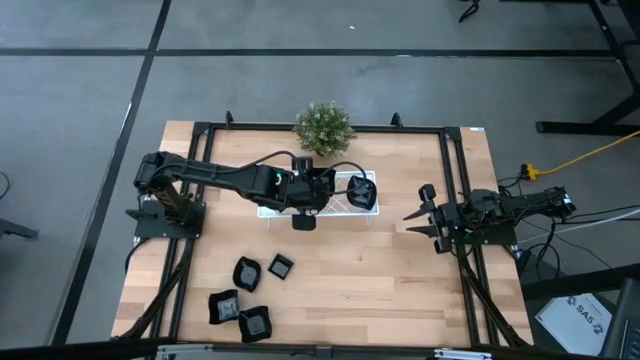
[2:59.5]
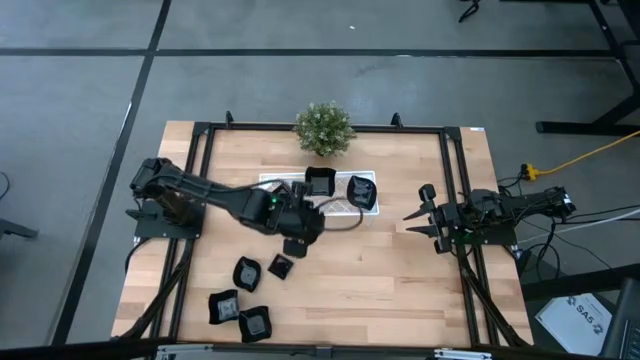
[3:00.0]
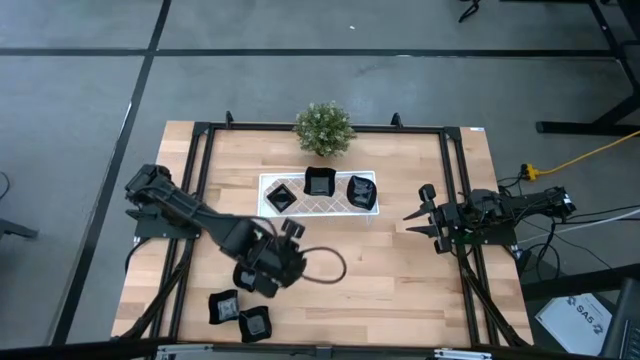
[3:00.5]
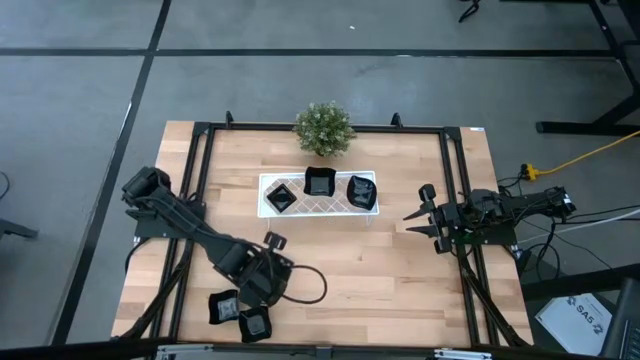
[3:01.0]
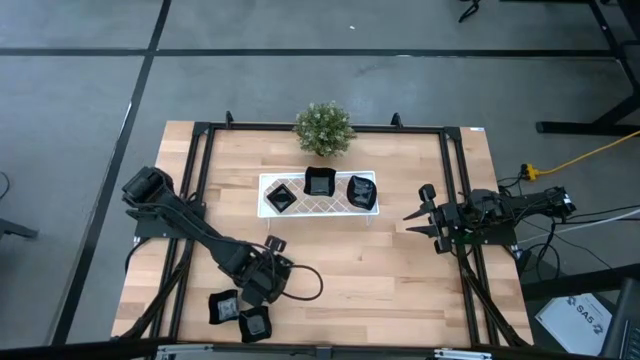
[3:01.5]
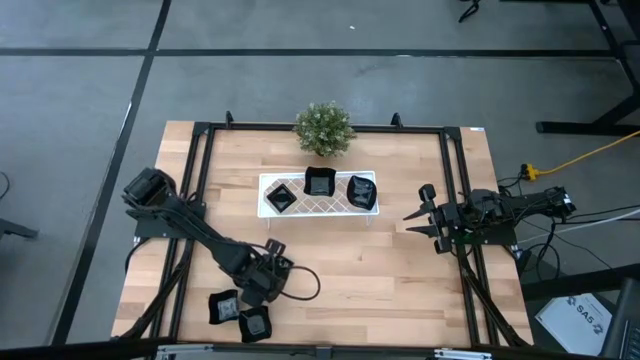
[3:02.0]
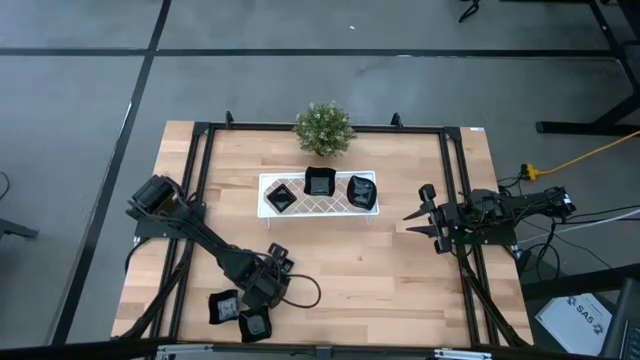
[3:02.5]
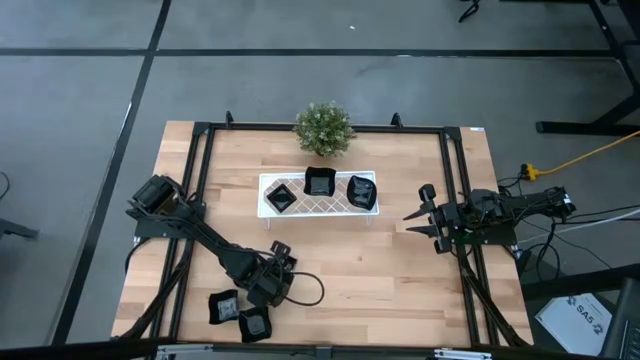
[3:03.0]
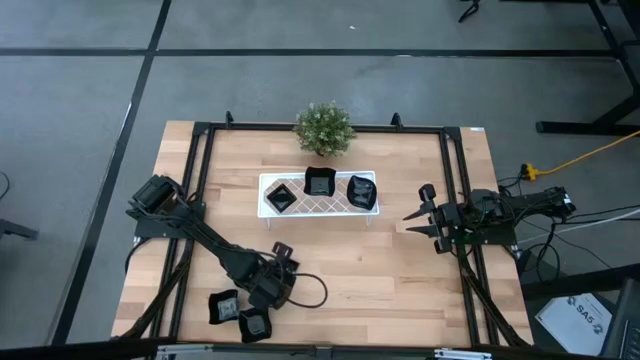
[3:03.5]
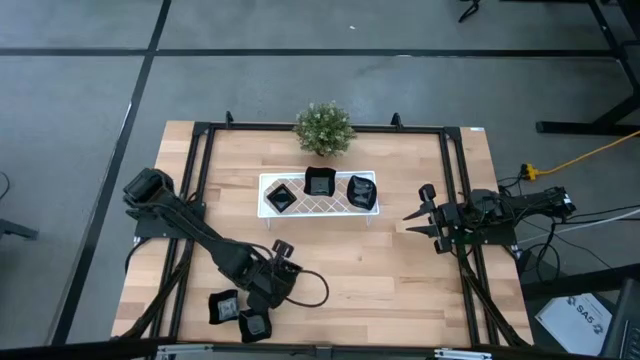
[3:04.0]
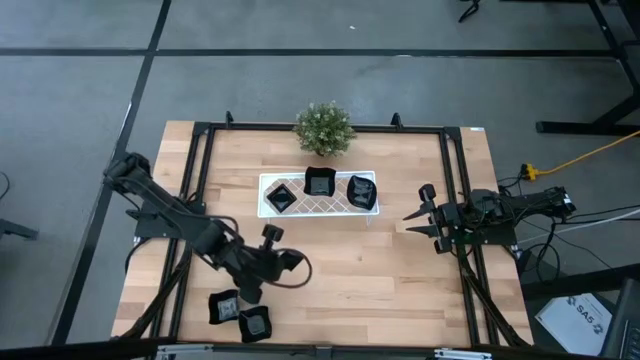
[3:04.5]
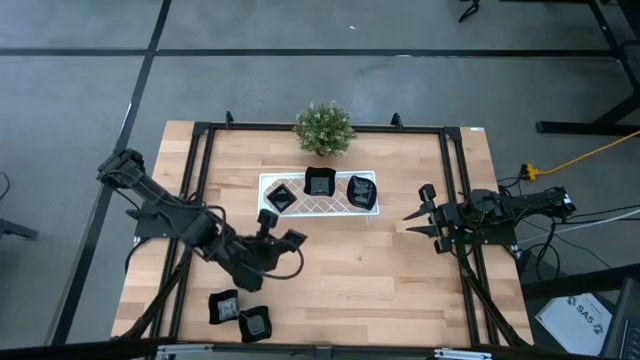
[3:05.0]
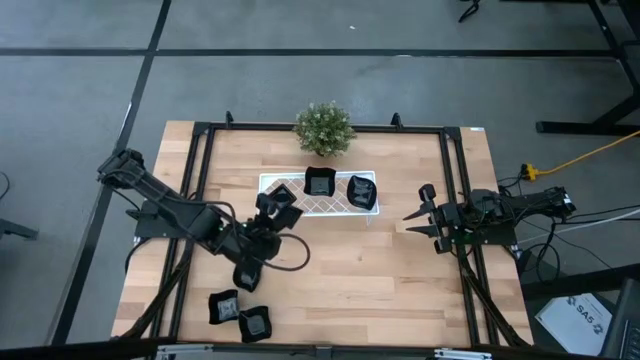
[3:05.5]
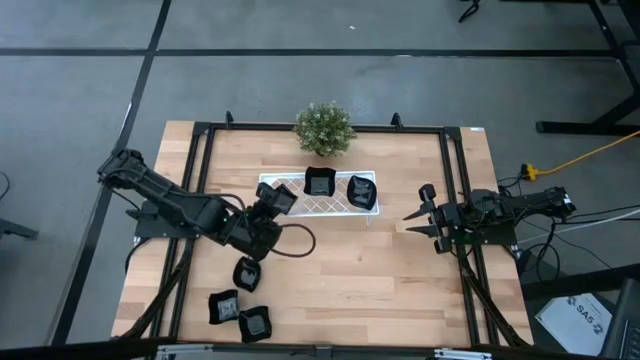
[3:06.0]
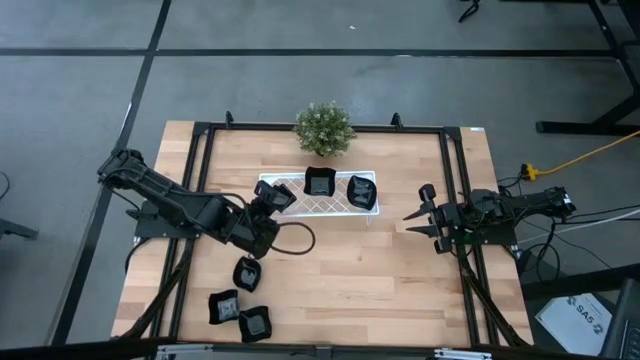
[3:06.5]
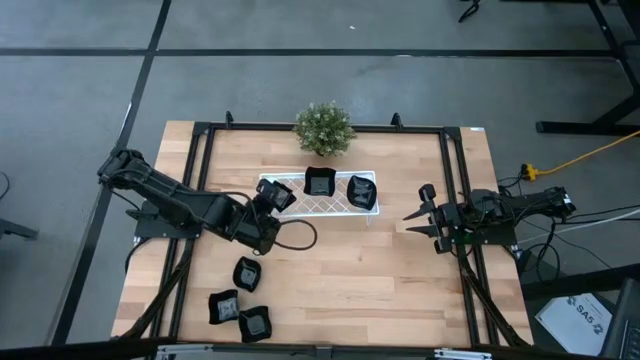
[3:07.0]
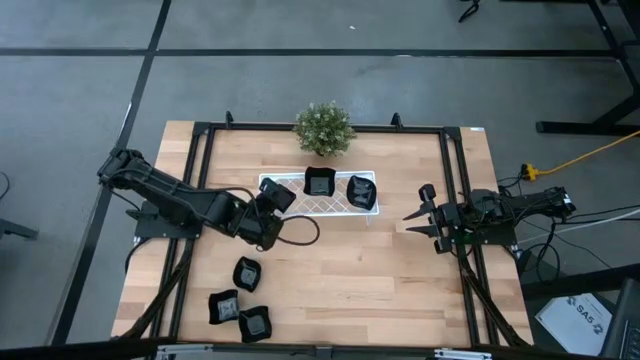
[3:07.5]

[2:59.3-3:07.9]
Task: Pick & Place Mini shaped plates
Stack the black square plate on top of the black square plate on the shelf

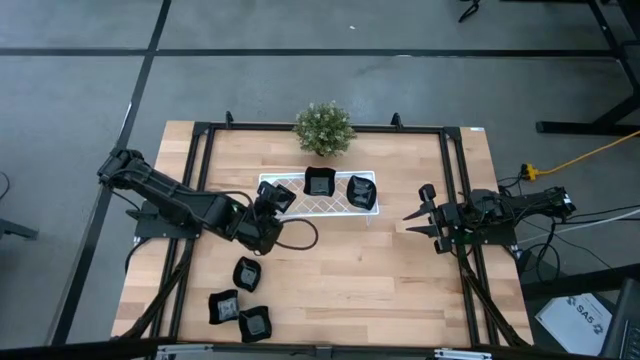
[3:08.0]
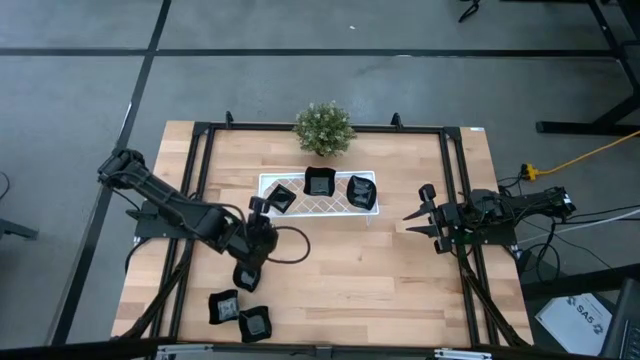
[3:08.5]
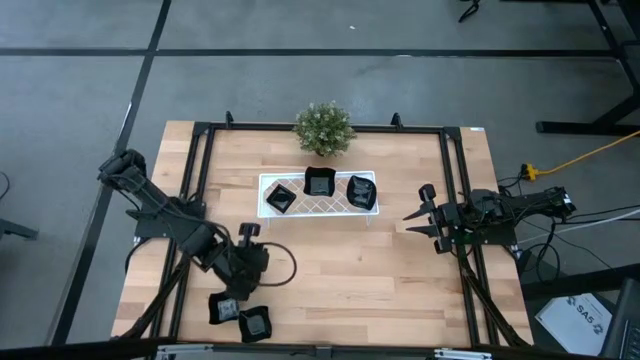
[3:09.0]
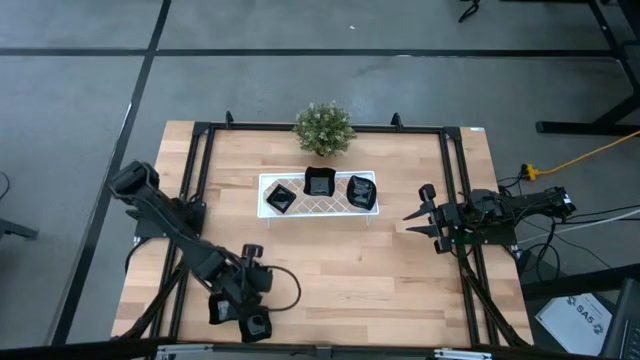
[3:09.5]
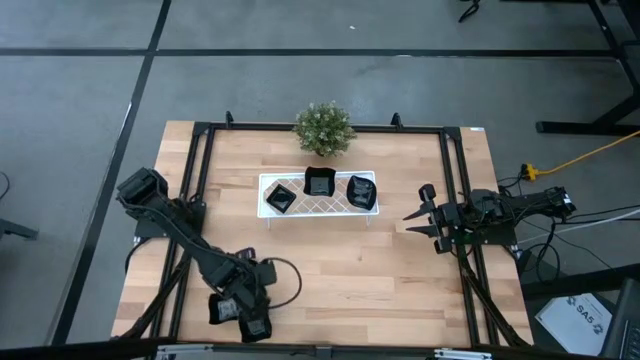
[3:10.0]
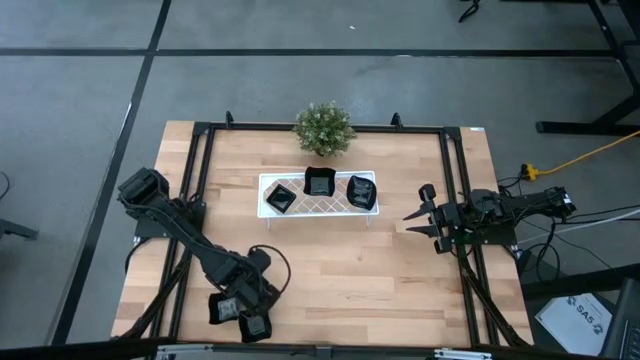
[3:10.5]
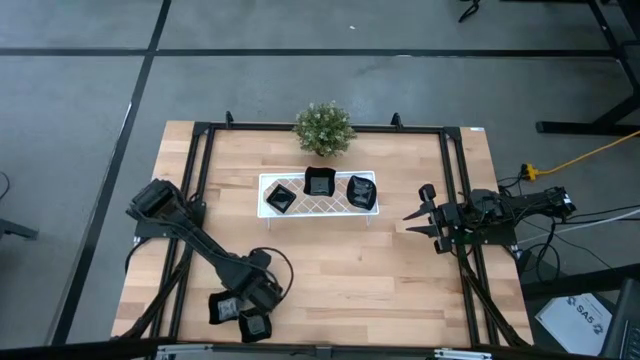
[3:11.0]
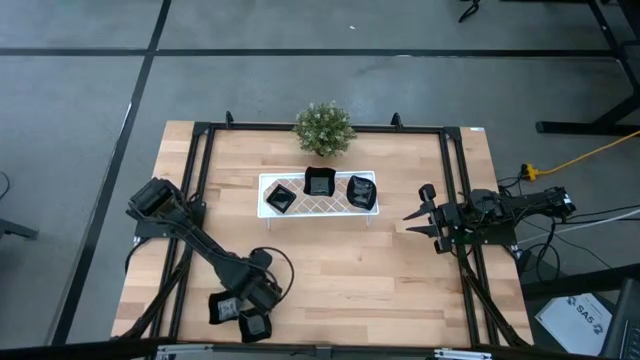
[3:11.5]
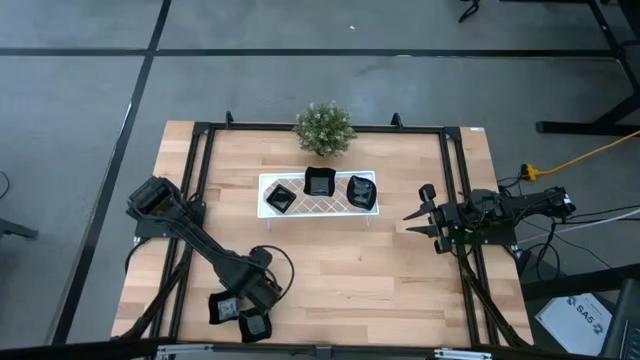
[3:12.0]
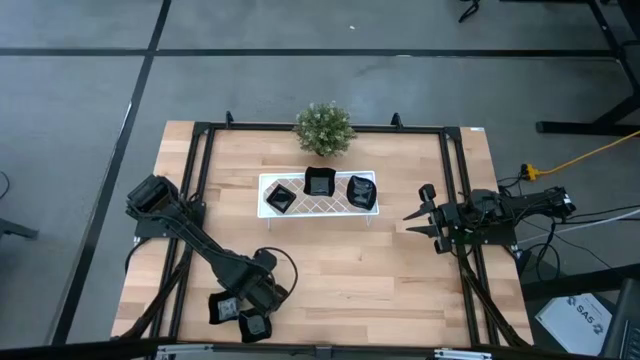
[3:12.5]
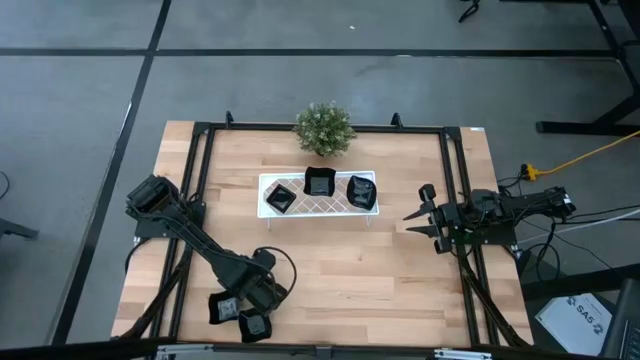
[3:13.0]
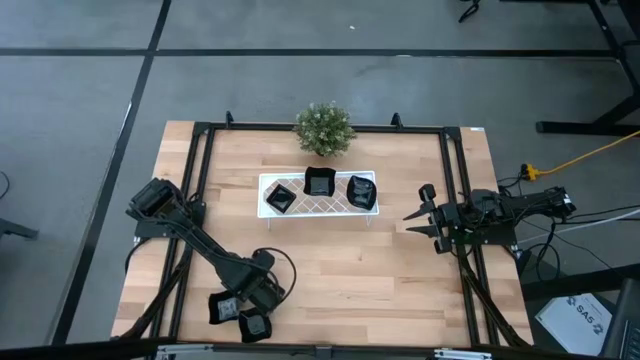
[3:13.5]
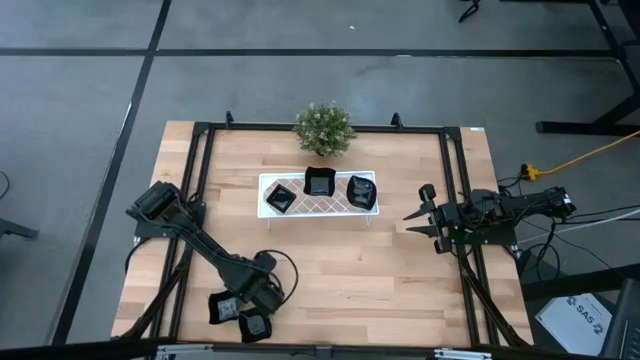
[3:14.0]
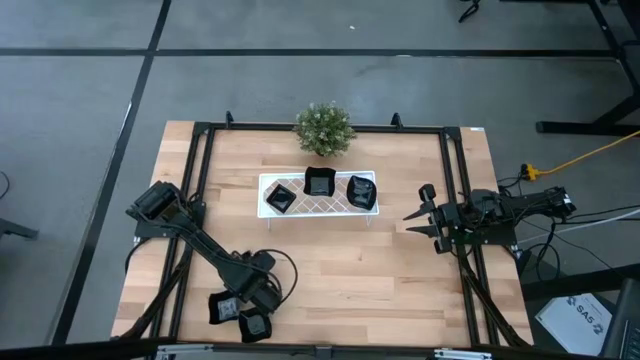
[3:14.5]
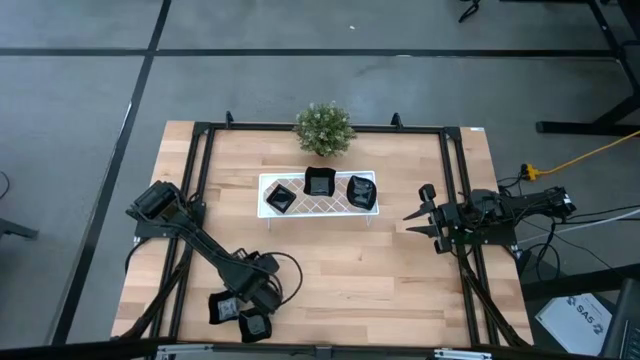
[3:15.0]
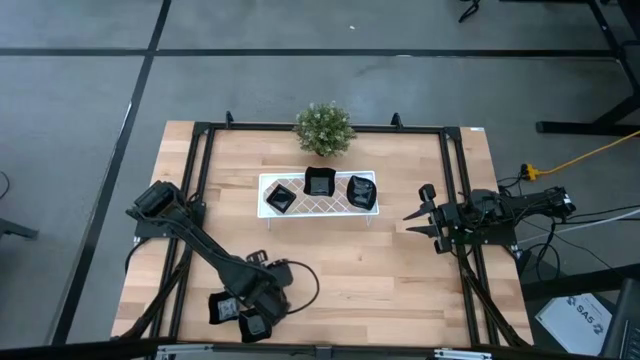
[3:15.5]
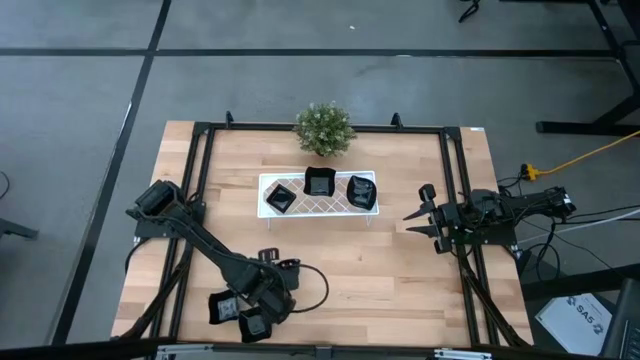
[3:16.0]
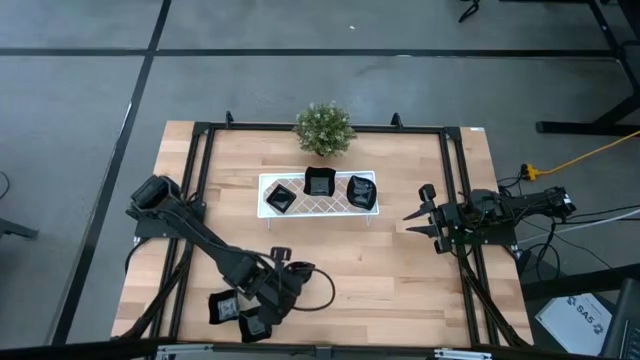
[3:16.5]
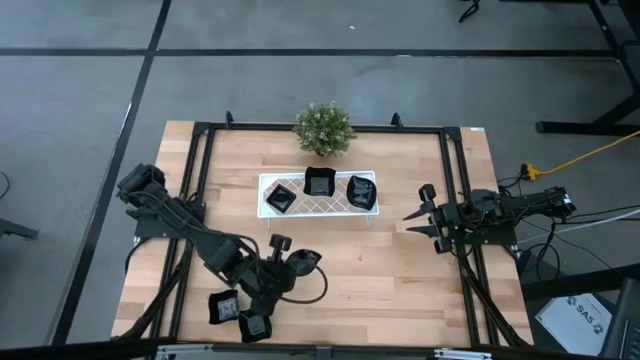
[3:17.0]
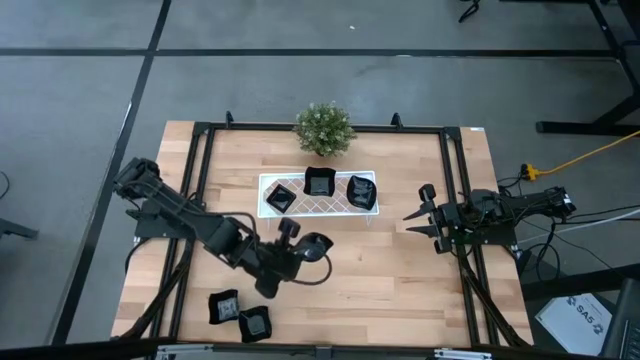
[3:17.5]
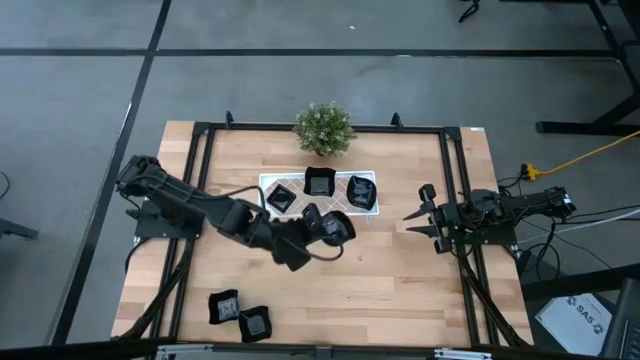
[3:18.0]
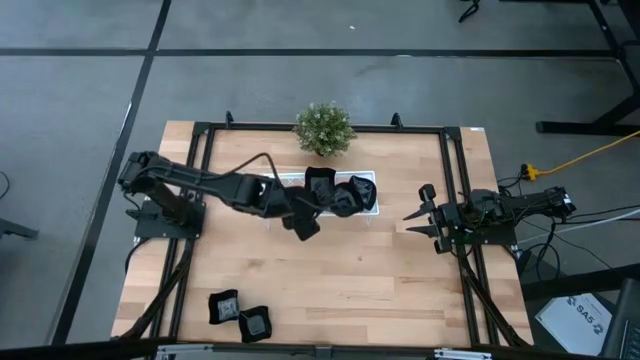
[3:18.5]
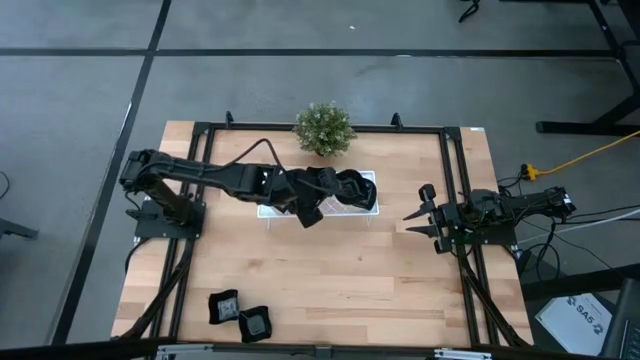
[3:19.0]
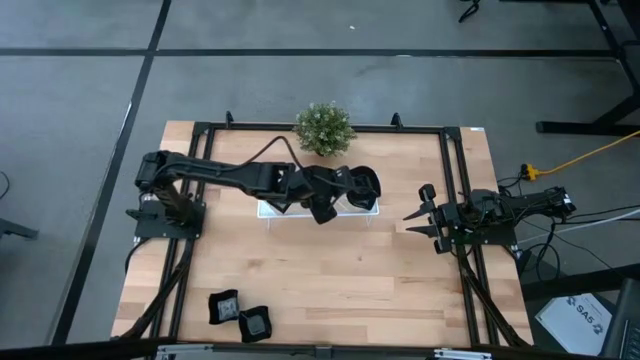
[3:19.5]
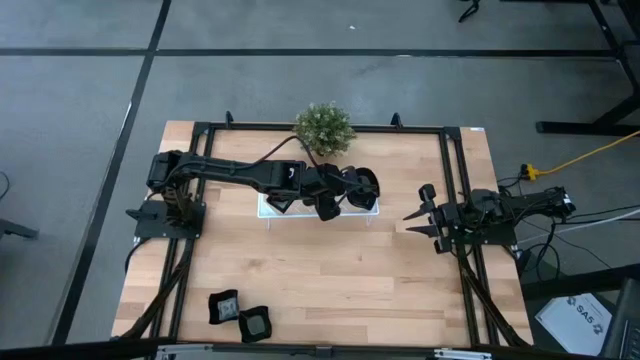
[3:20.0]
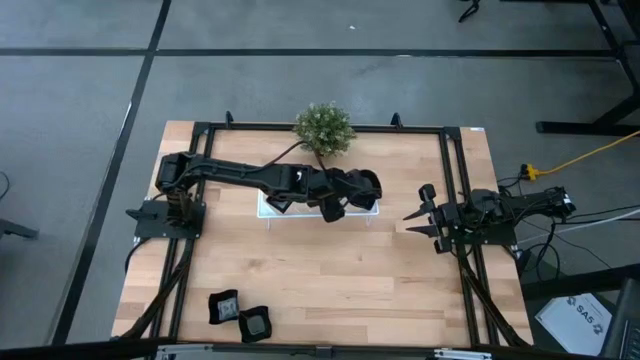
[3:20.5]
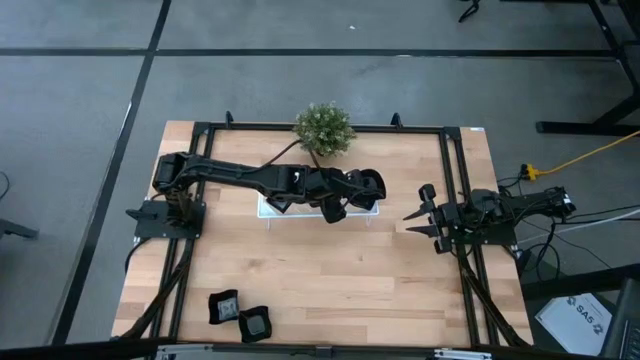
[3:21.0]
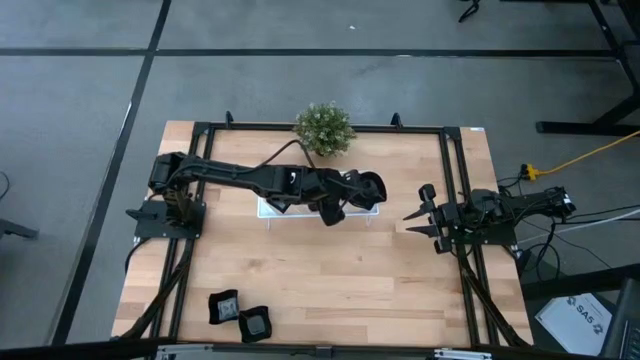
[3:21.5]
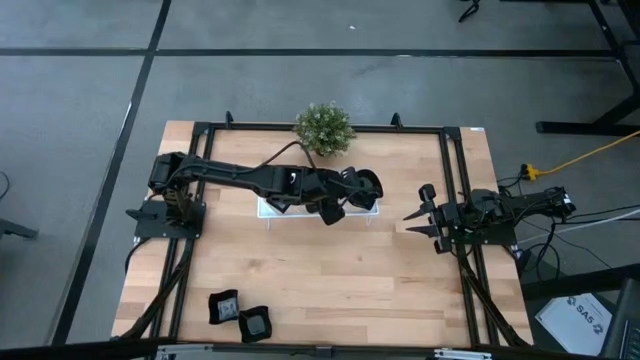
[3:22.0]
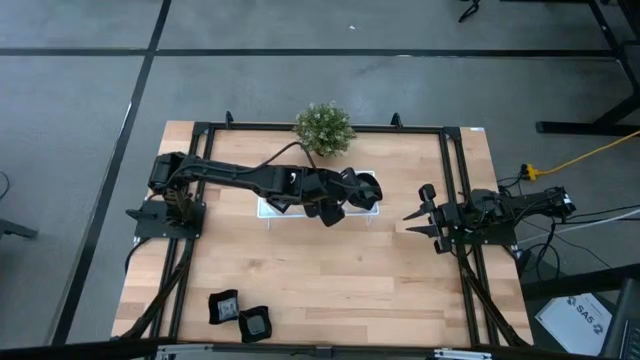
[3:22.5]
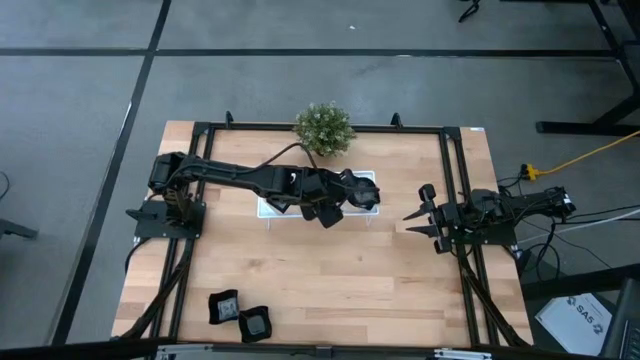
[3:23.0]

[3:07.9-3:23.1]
Stack the black leaf-shaped plate on top of the black leaf-shaped plate on the shelf
